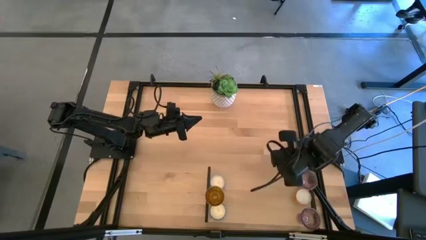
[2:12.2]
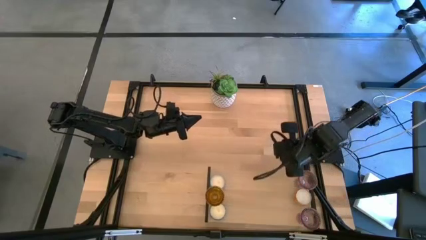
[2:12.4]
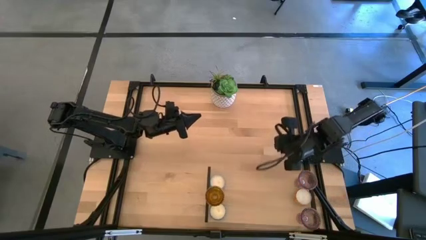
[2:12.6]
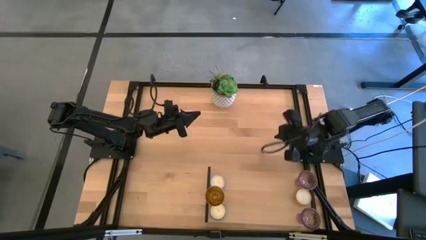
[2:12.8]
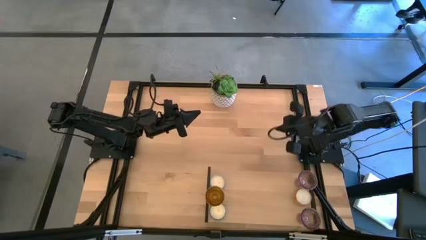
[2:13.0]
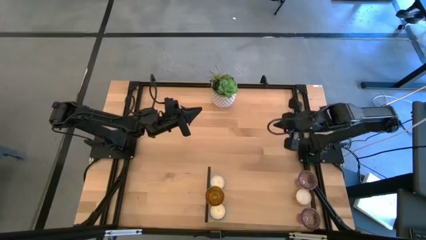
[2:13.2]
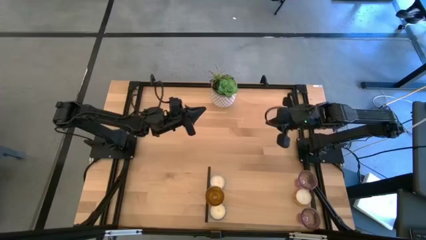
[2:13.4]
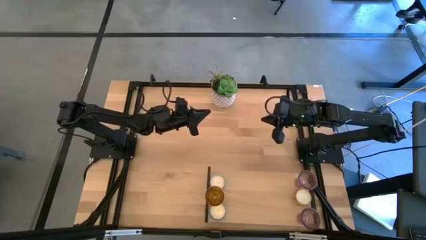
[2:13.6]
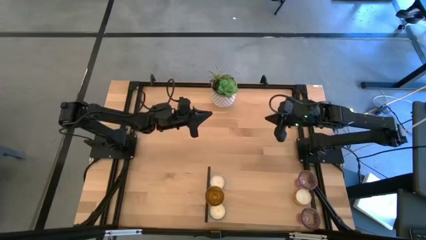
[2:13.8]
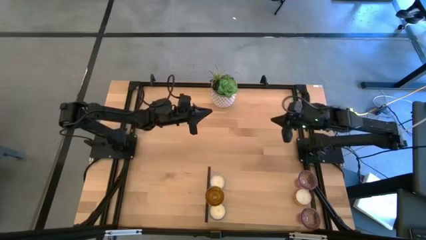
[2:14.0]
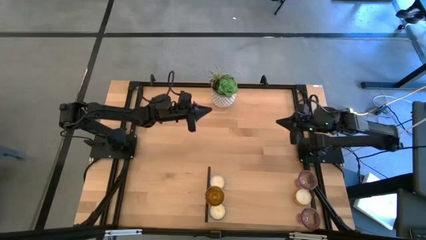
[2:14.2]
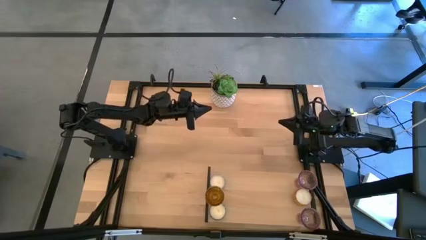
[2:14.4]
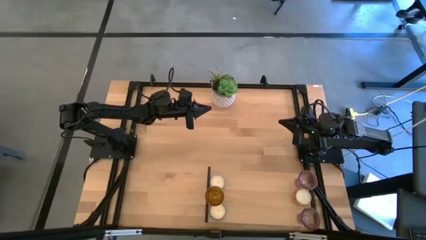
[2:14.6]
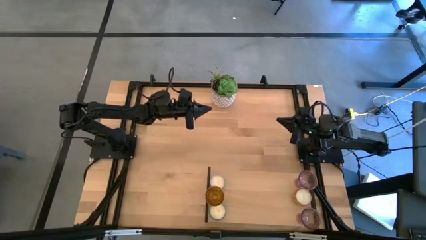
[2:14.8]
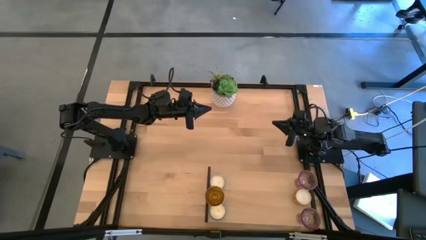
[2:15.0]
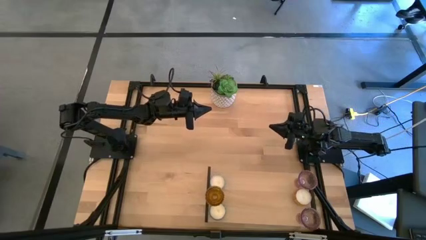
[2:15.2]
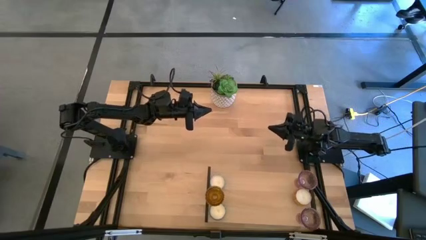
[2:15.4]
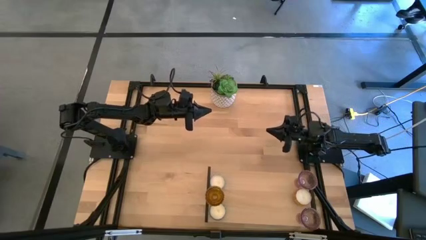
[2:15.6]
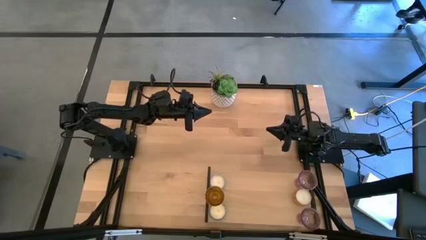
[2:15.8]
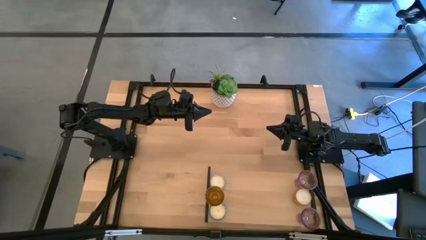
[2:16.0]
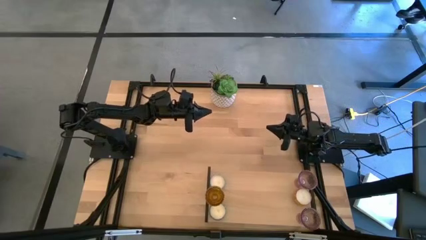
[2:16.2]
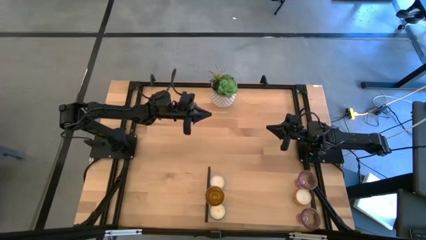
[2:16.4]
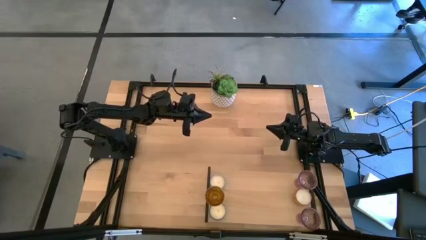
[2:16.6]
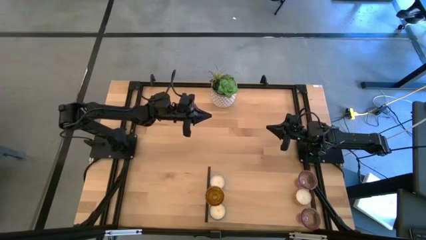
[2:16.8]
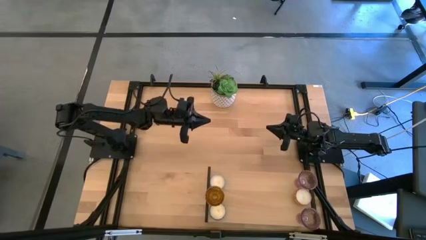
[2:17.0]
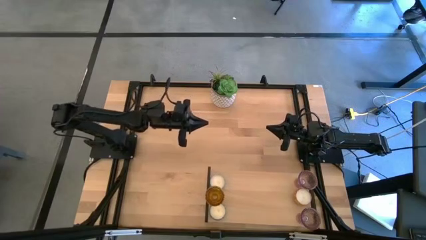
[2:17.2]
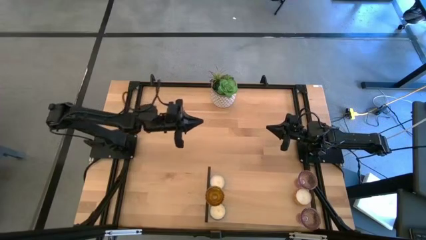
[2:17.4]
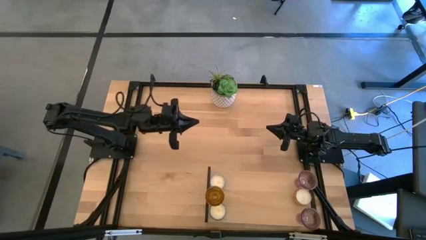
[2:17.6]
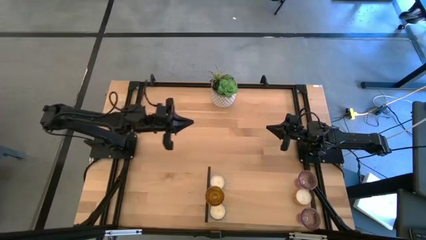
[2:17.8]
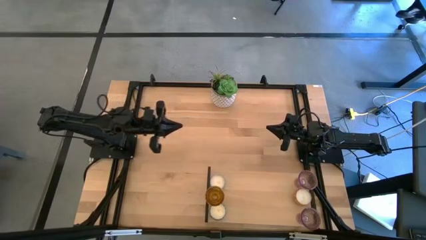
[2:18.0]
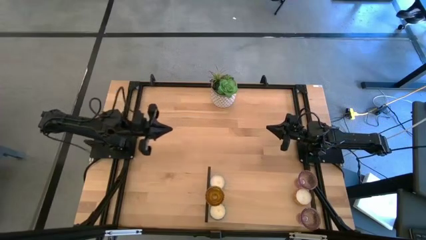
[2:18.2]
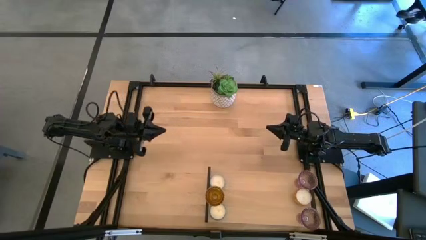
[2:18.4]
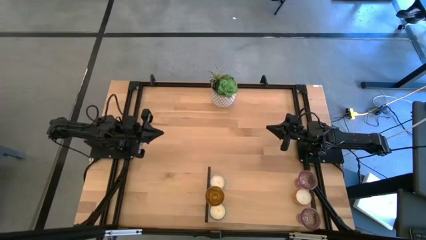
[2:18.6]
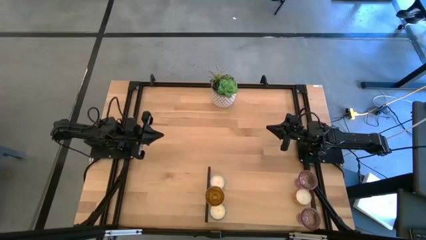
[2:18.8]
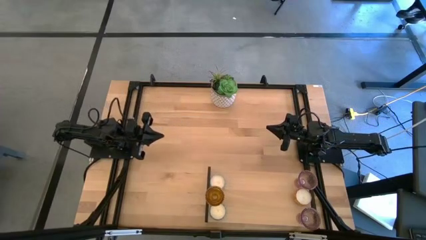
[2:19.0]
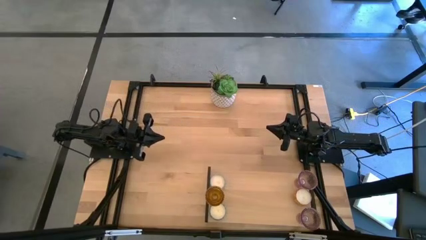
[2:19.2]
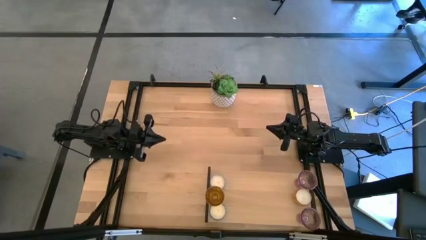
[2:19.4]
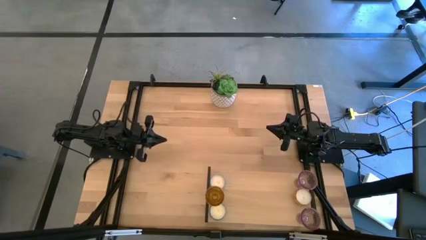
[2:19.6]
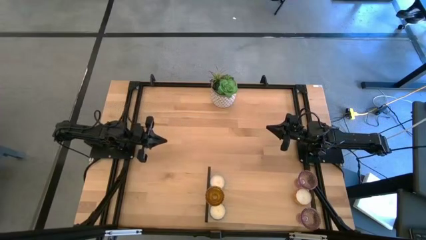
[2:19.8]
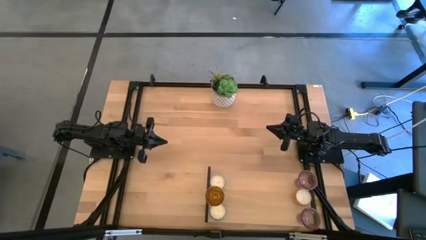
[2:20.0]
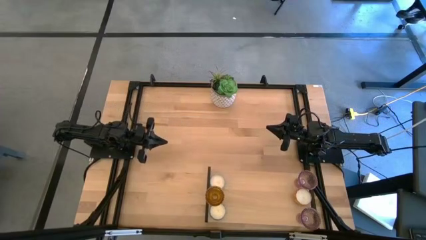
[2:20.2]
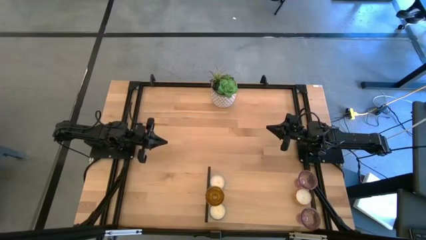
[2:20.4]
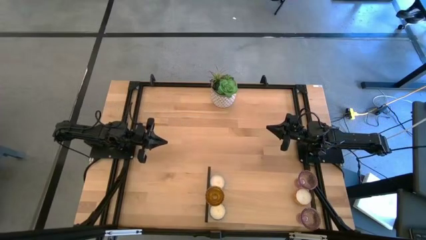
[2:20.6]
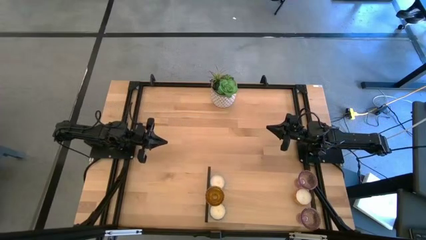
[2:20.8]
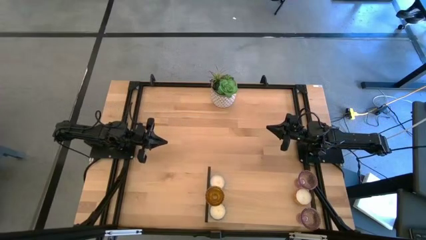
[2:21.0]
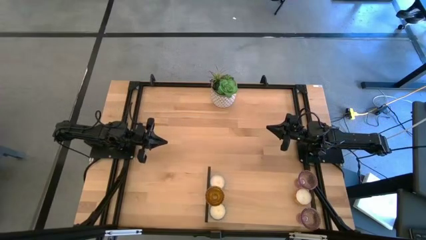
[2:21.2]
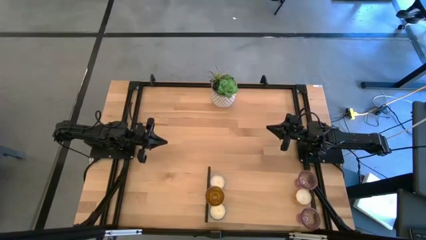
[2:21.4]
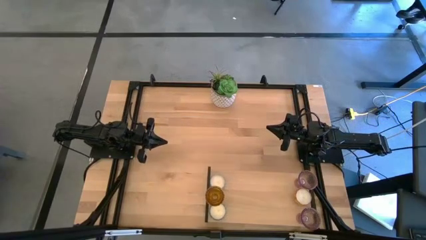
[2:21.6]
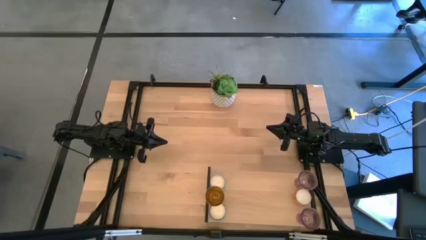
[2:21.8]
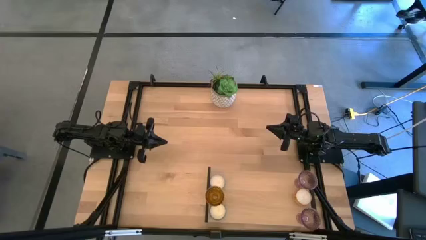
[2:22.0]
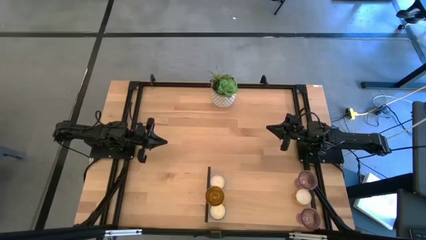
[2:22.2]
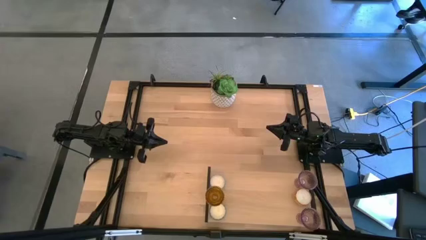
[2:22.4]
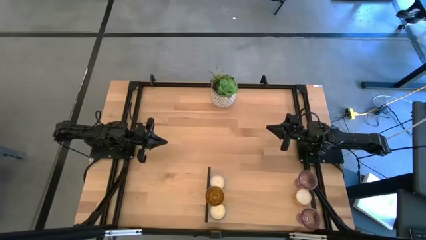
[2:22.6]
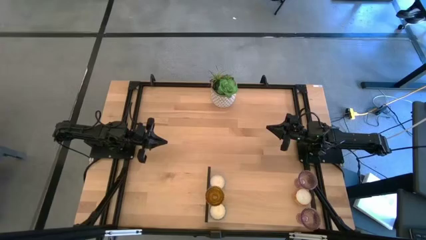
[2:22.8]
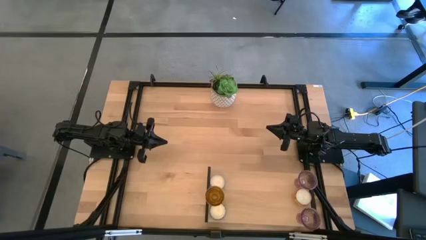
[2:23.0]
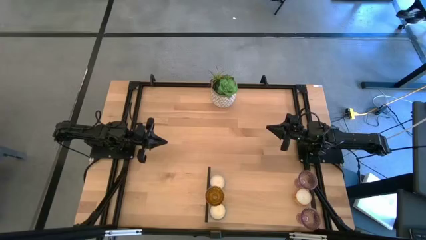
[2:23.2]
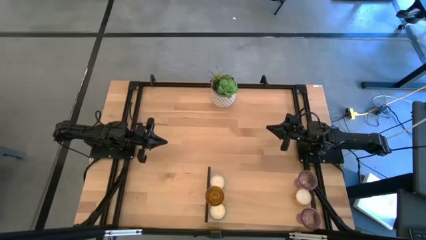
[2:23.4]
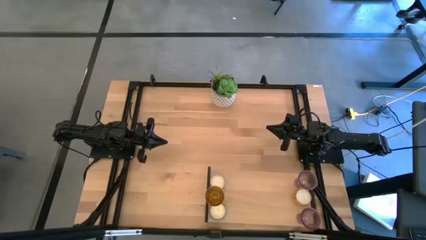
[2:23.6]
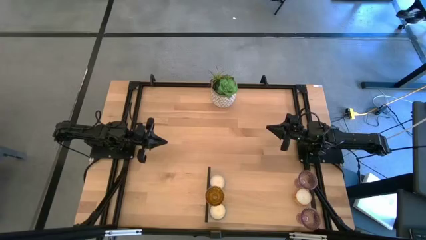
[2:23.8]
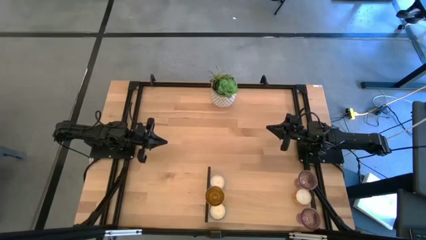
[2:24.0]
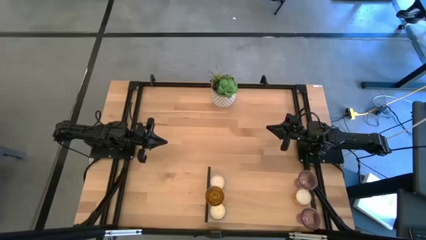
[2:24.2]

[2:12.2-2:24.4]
Task: Pick & Place candle stick holders
Return to Home Position

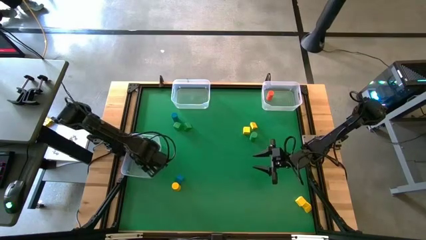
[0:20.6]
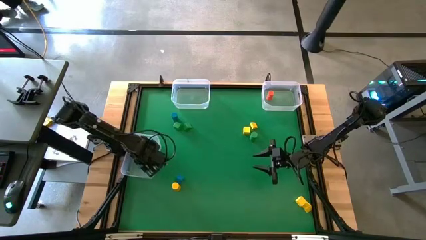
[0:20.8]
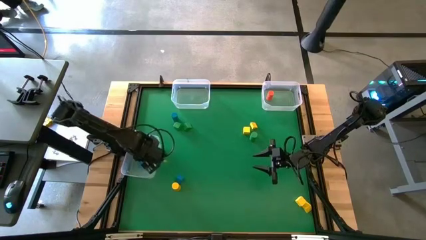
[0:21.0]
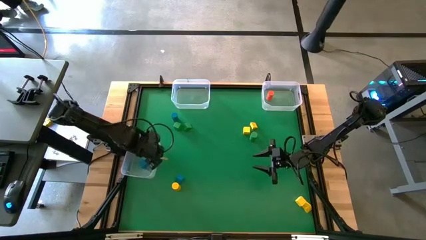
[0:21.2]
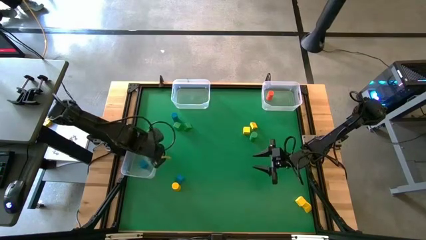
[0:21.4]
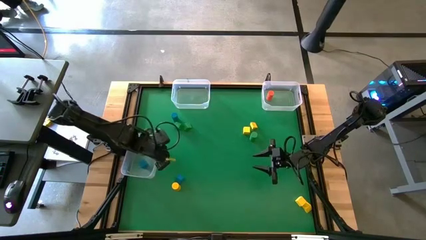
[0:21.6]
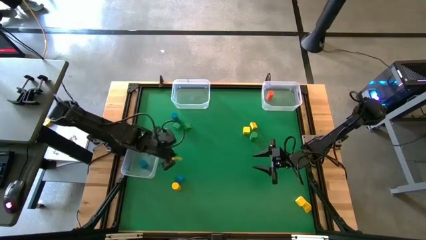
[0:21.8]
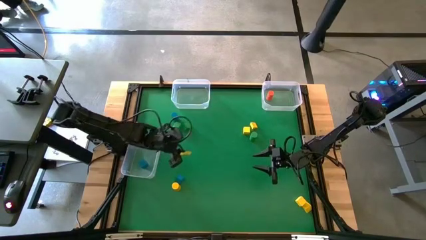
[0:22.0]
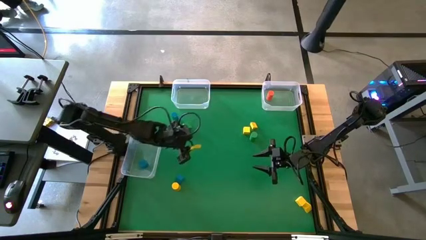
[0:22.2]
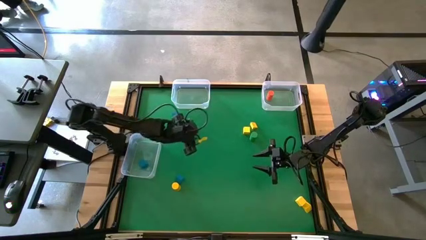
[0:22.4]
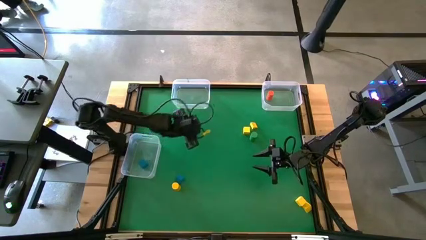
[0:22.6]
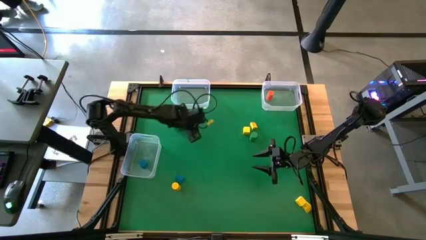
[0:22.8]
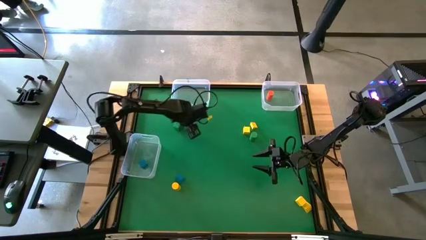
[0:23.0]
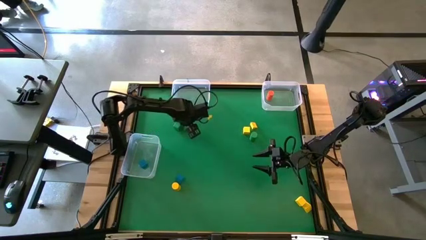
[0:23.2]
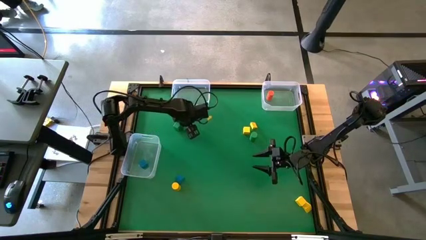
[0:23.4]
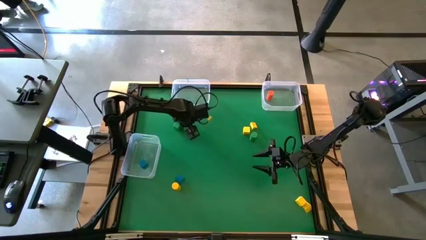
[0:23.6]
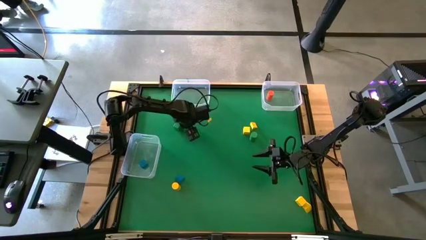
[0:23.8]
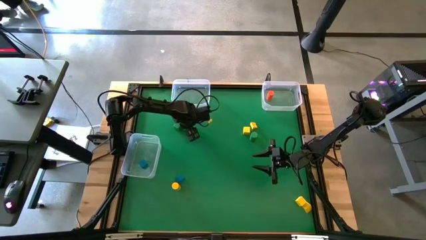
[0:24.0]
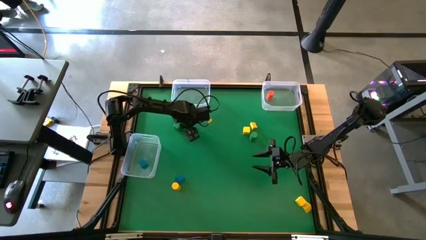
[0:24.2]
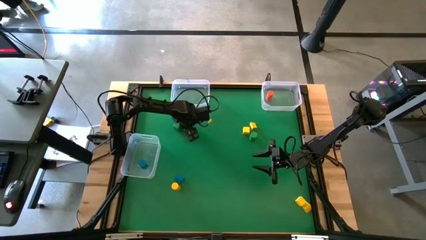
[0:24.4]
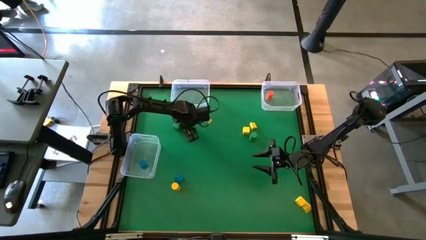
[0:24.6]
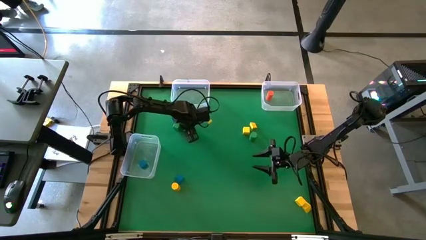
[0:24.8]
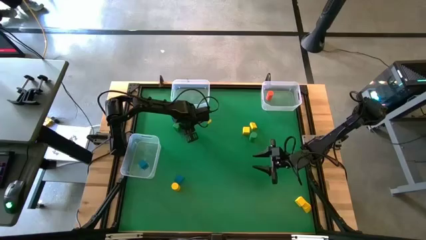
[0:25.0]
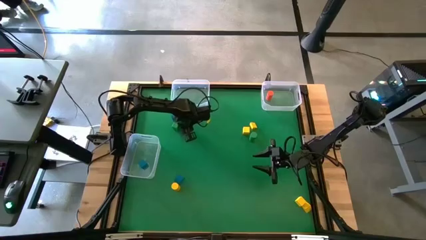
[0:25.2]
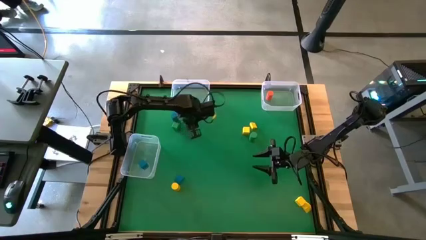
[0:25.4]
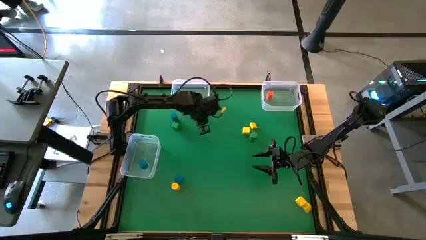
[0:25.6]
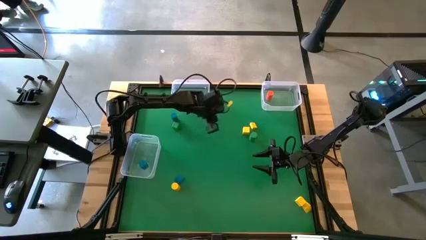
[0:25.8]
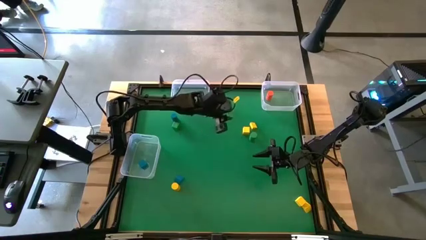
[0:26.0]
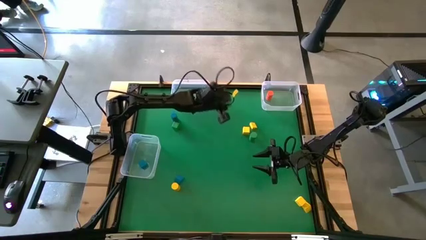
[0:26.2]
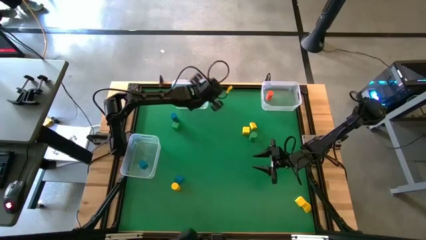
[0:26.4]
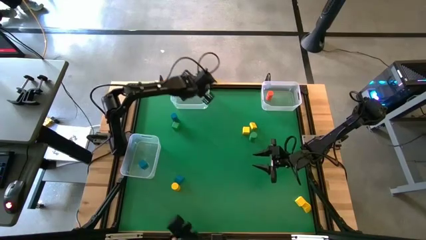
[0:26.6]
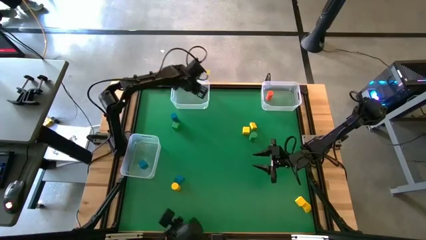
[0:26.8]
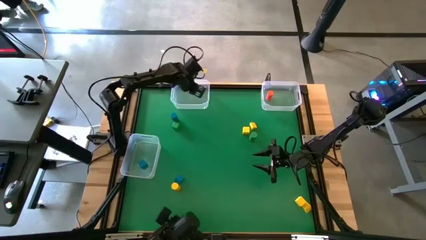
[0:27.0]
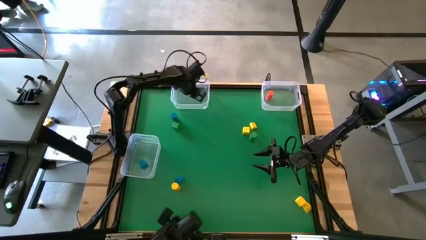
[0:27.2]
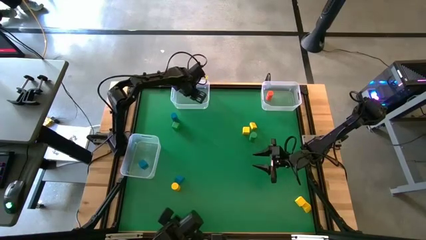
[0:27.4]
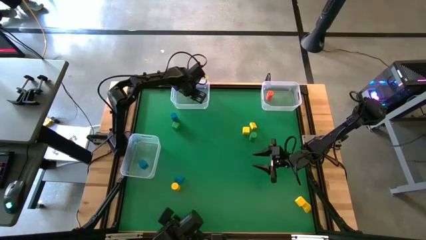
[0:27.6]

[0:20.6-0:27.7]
Task: Sort blocks by size
Put the green triangle block into the top left transparent bin
